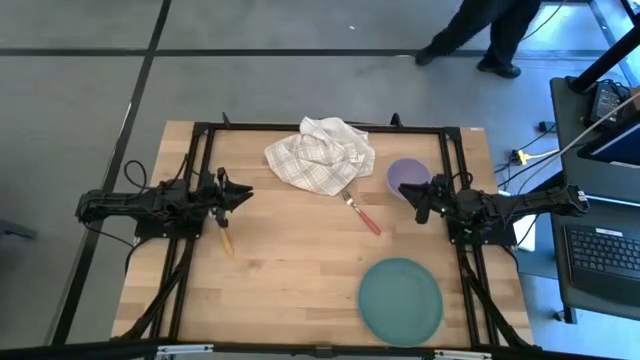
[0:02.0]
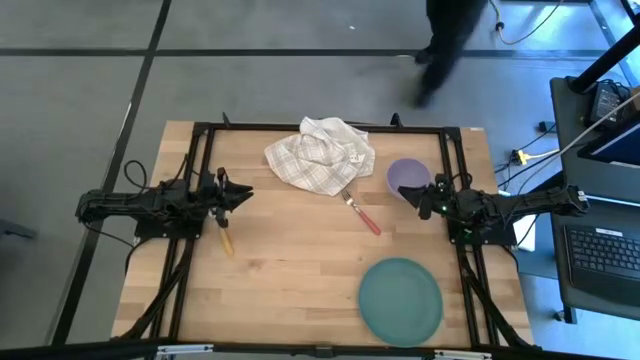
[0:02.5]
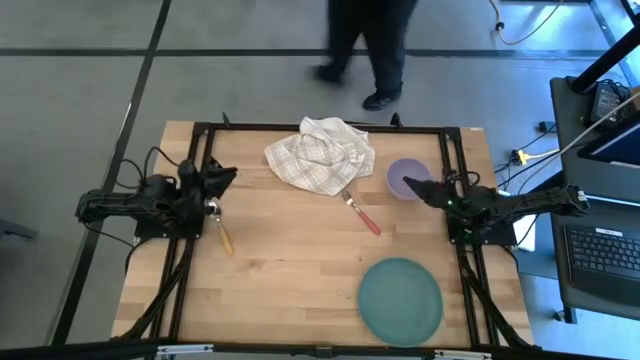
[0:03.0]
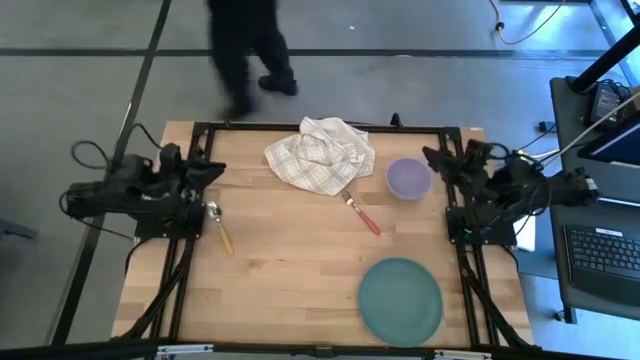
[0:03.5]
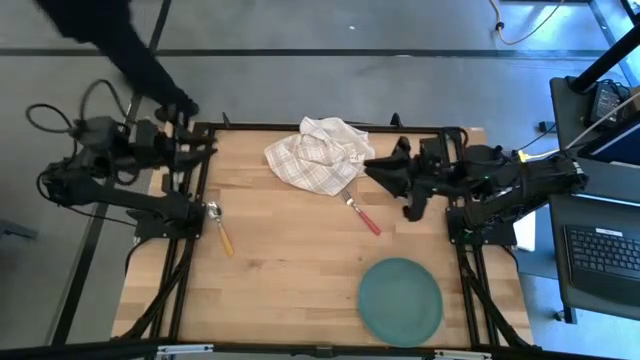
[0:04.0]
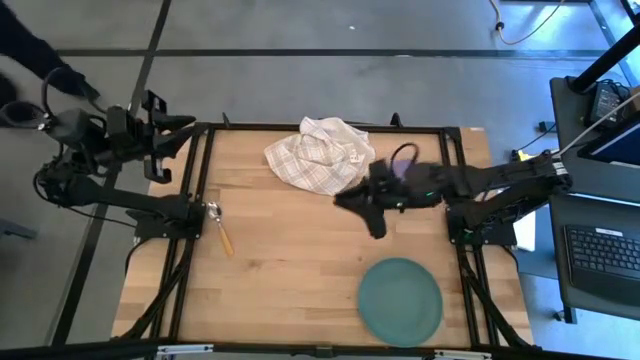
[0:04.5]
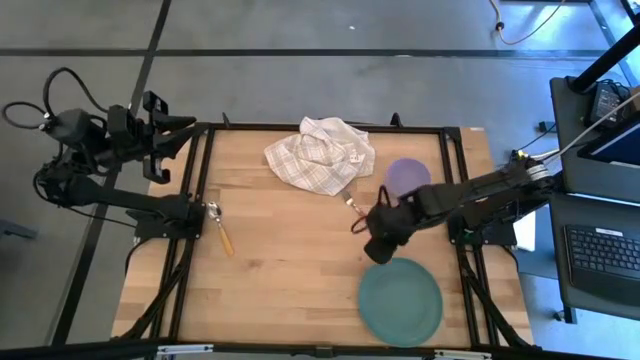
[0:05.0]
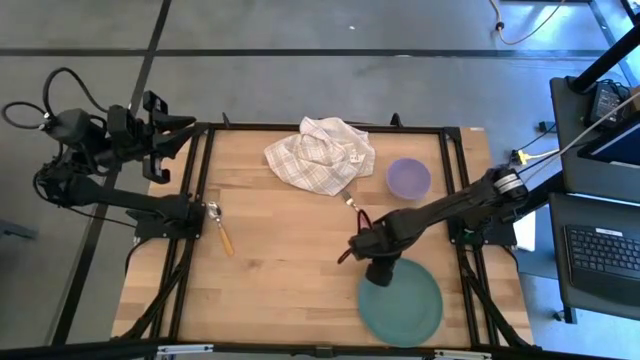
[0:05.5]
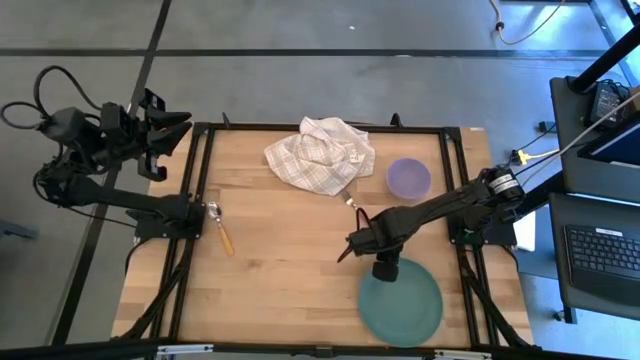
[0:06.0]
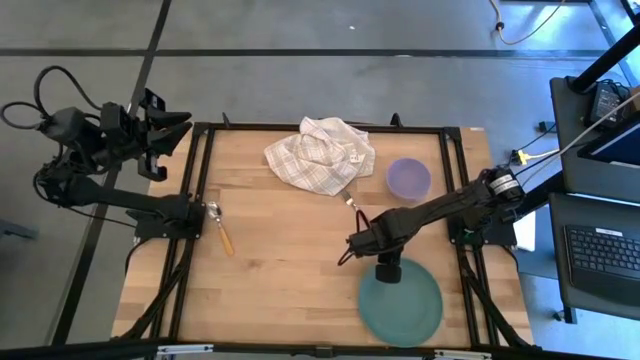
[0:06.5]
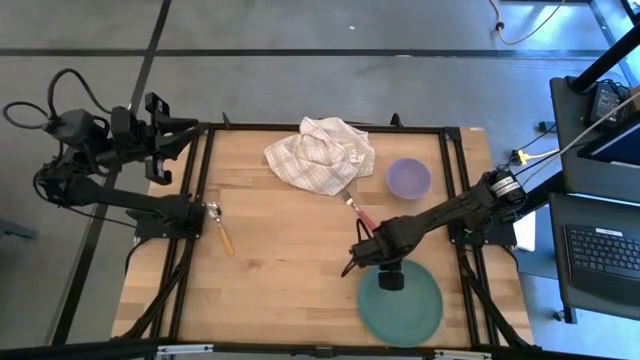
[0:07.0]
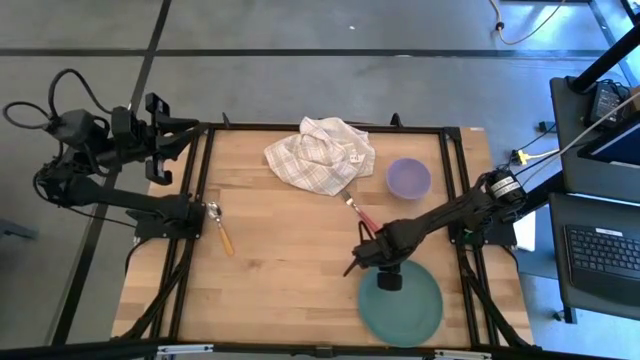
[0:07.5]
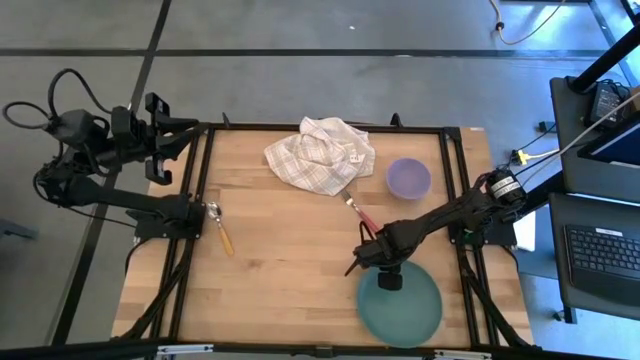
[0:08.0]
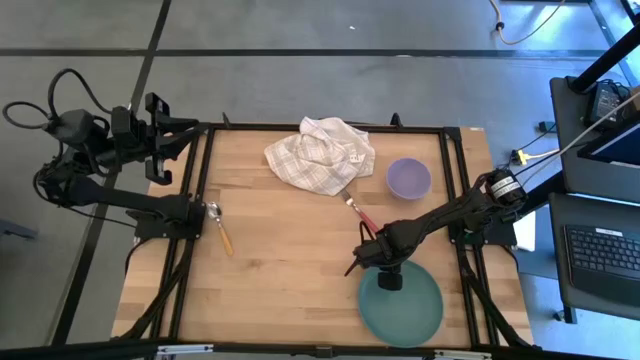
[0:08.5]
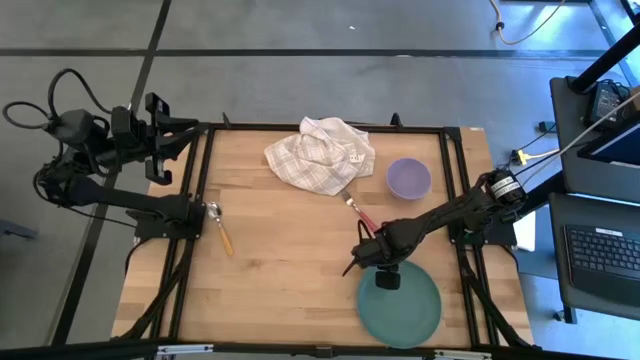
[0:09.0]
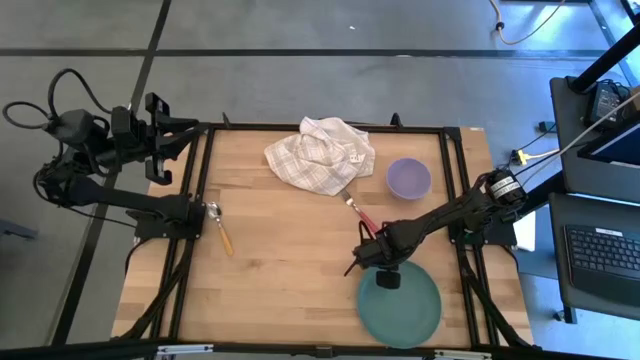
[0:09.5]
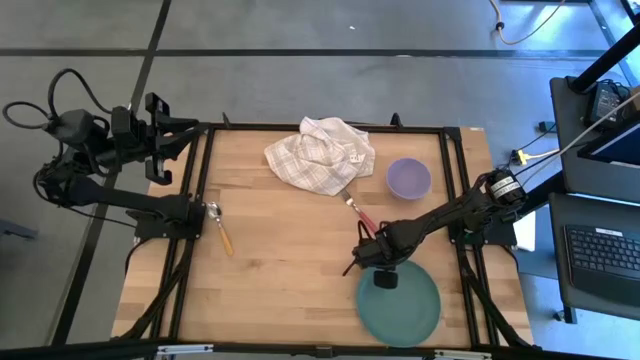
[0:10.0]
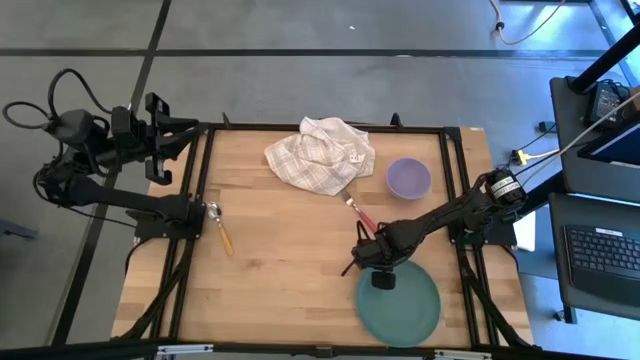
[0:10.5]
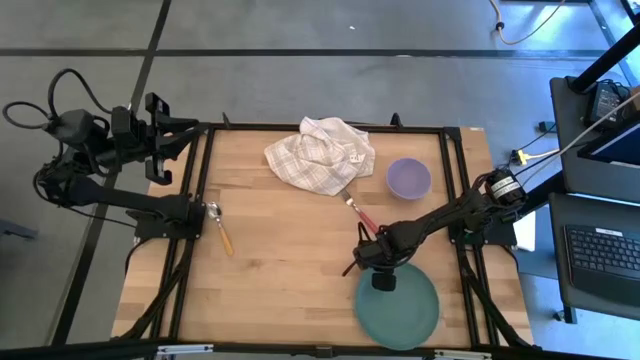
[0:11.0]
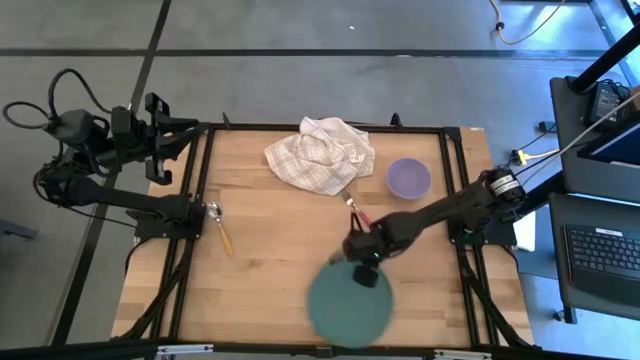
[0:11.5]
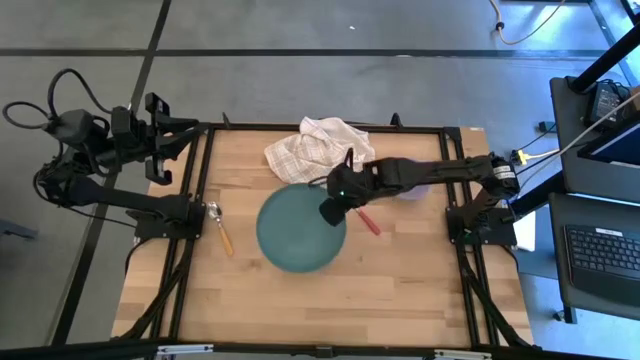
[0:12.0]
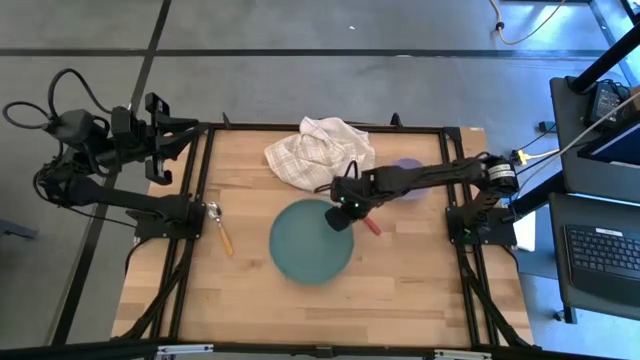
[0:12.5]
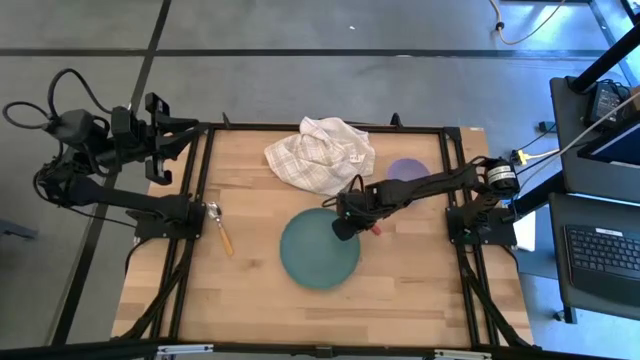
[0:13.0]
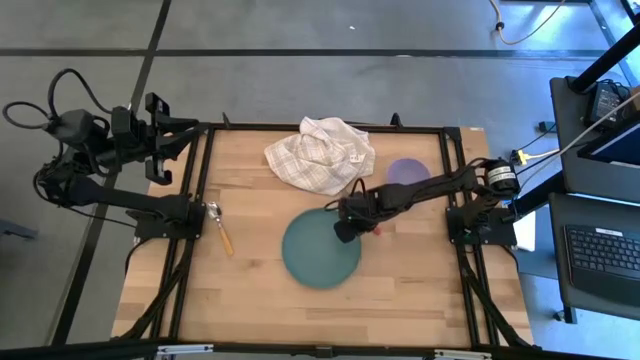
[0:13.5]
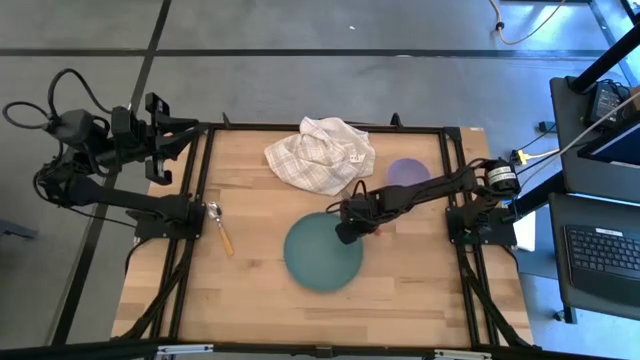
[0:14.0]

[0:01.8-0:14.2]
Task: Set table place
Put the light blue plate on the center of the table

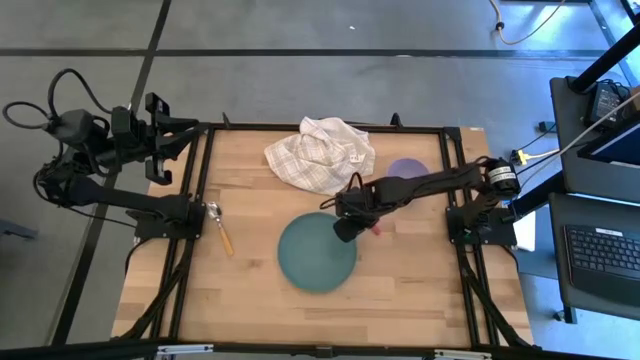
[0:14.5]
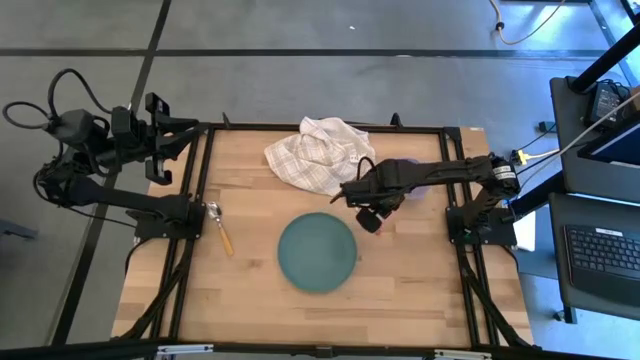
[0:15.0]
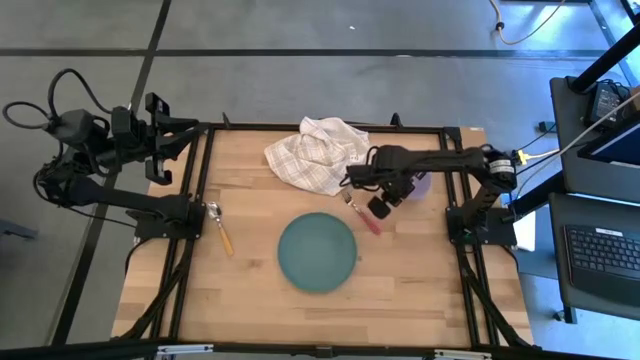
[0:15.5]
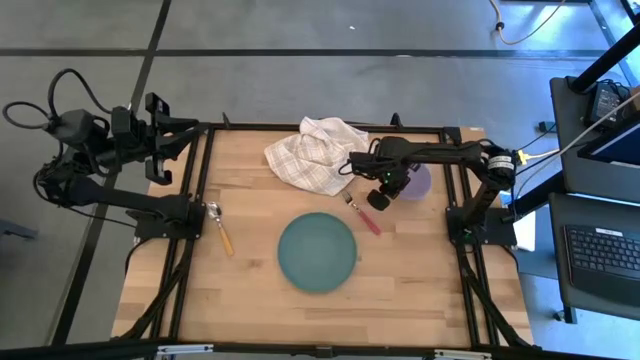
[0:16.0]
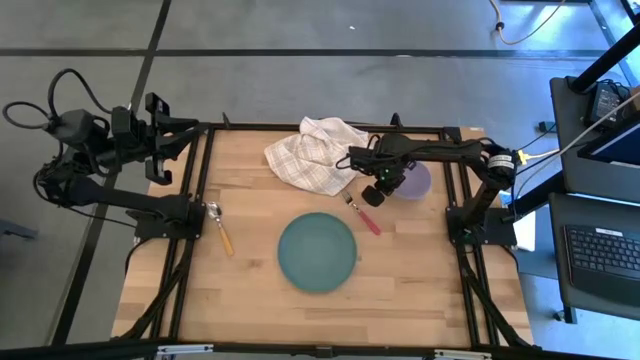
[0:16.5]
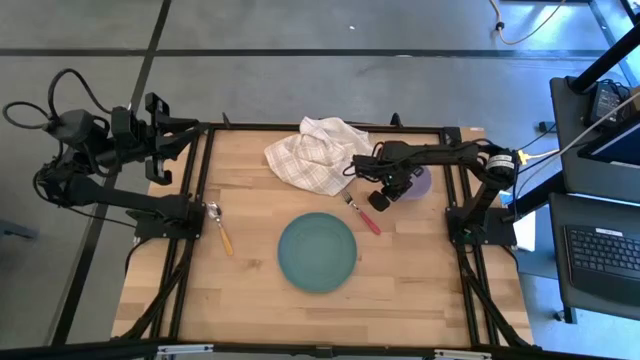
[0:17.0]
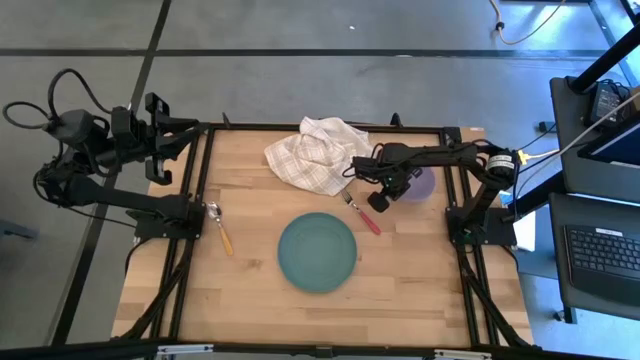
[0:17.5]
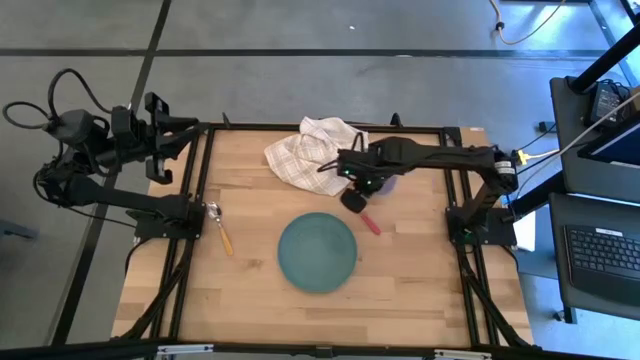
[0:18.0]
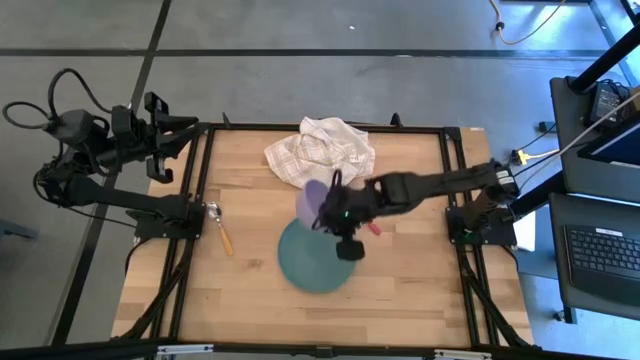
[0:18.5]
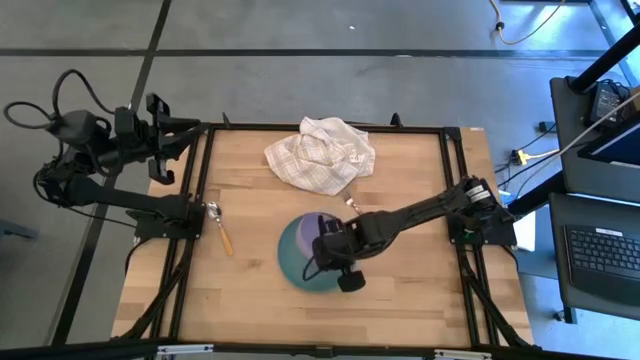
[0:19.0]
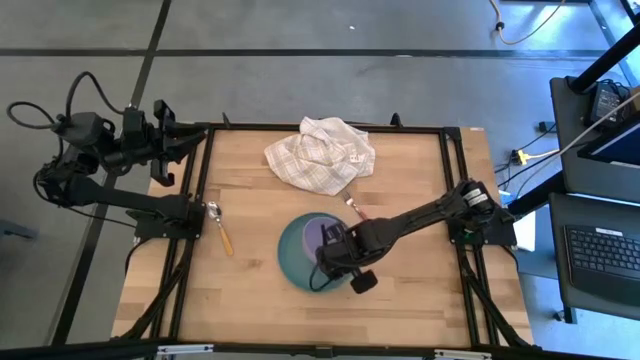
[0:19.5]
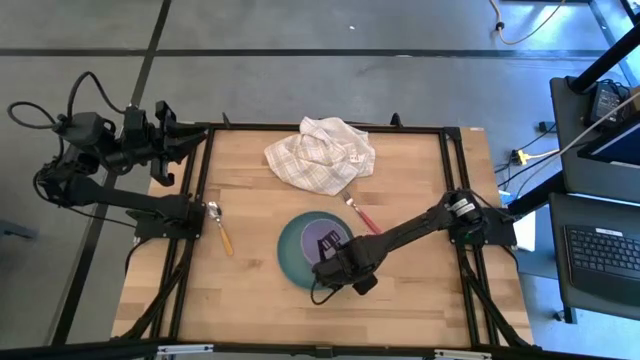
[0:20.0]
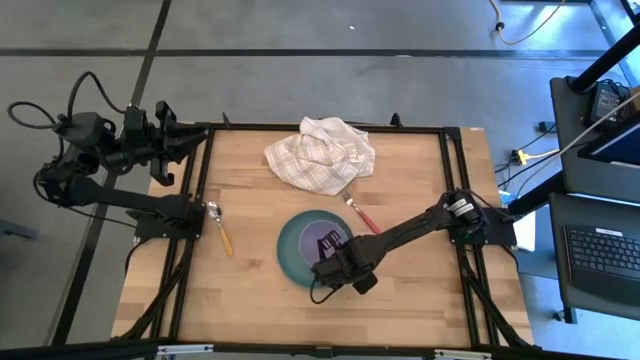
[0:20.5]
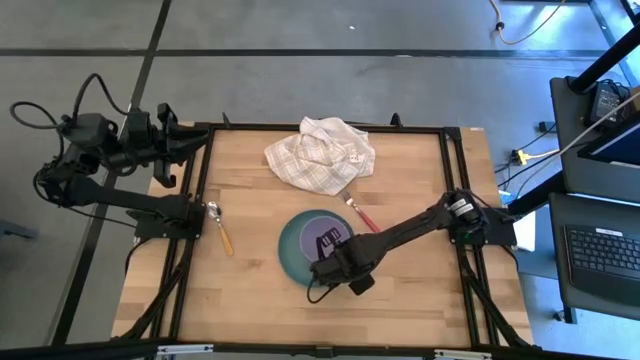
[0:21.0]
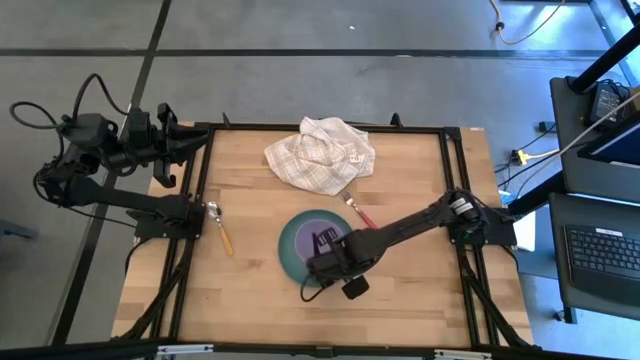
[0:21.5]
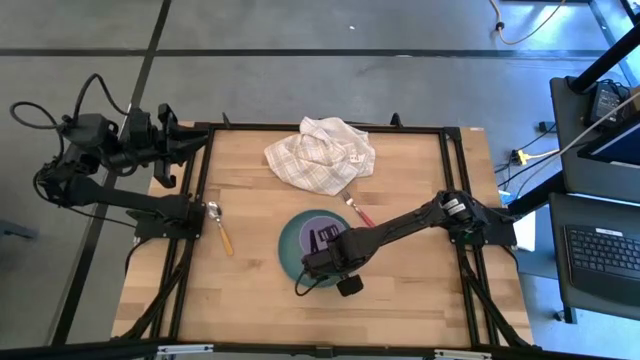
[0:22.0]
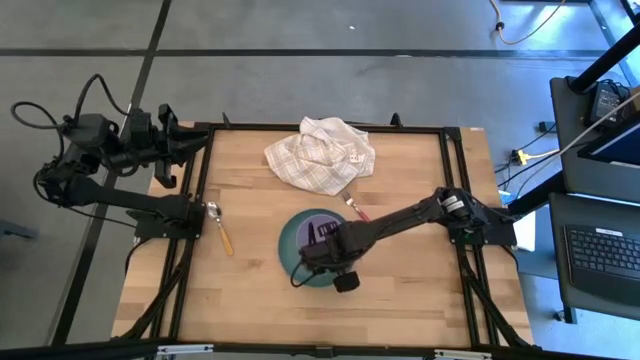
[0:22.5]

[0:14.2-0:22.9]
Put the purple bowl on top of the light blue plate
